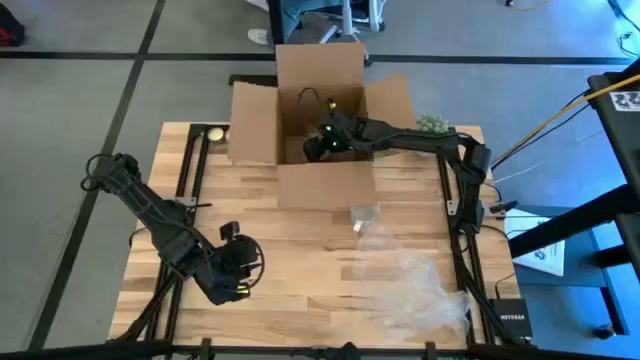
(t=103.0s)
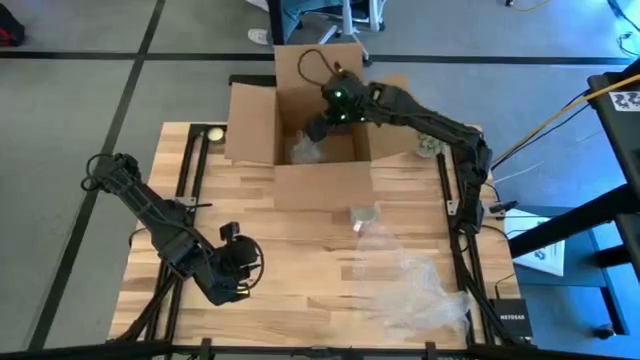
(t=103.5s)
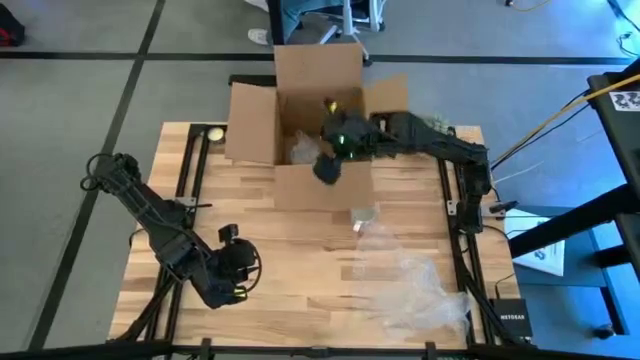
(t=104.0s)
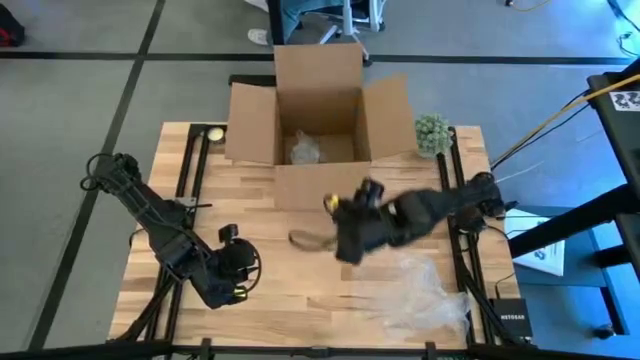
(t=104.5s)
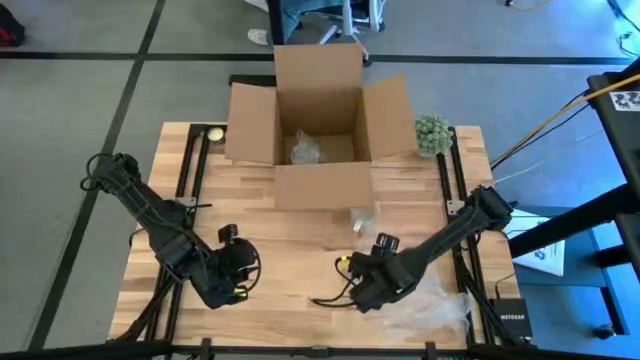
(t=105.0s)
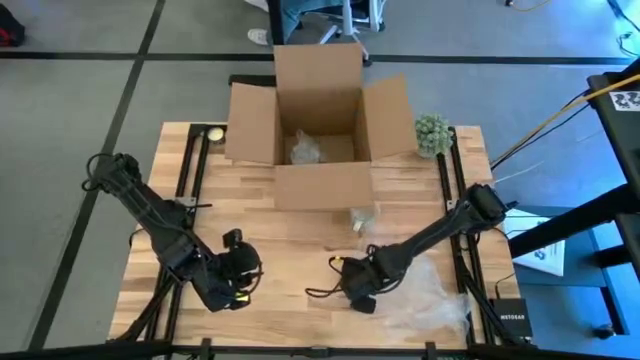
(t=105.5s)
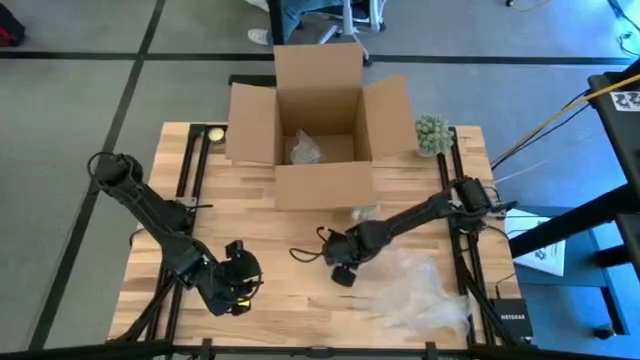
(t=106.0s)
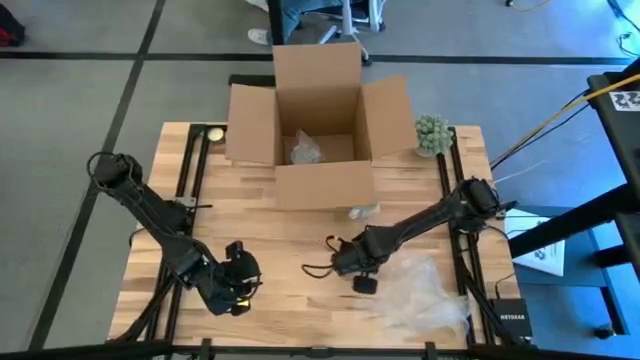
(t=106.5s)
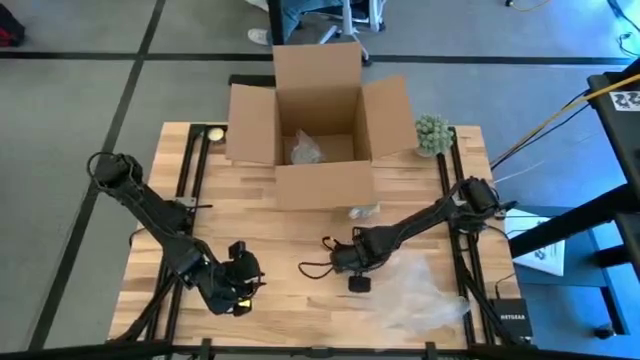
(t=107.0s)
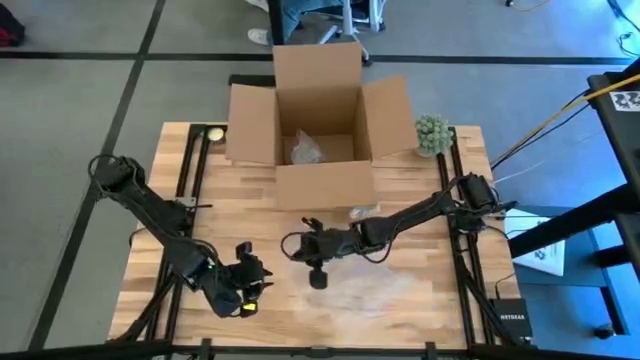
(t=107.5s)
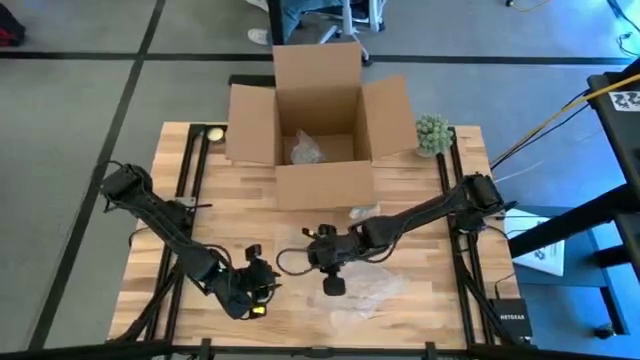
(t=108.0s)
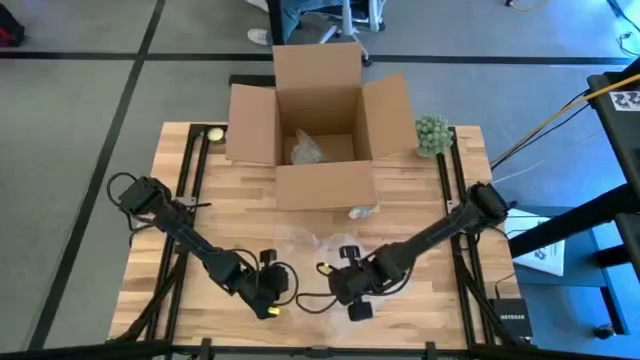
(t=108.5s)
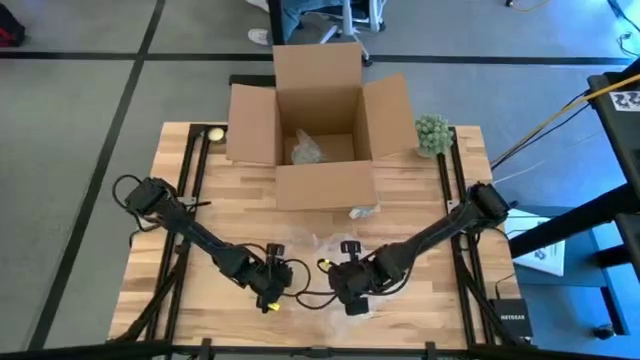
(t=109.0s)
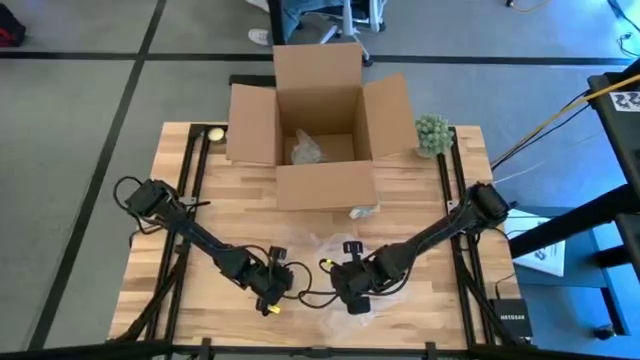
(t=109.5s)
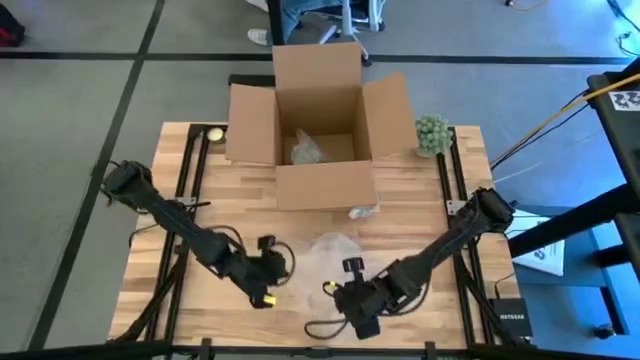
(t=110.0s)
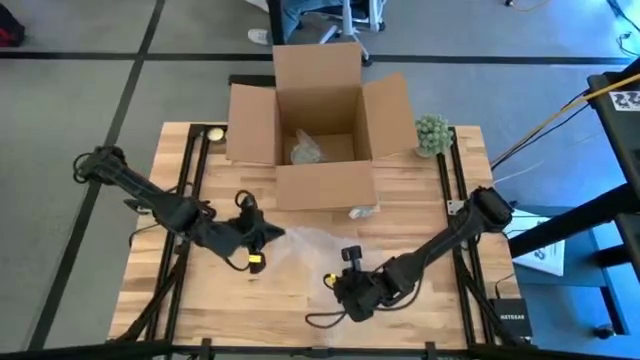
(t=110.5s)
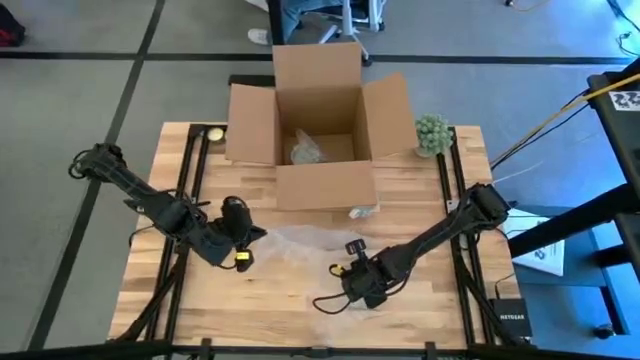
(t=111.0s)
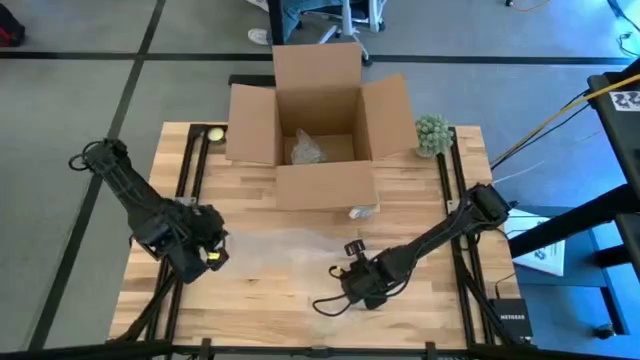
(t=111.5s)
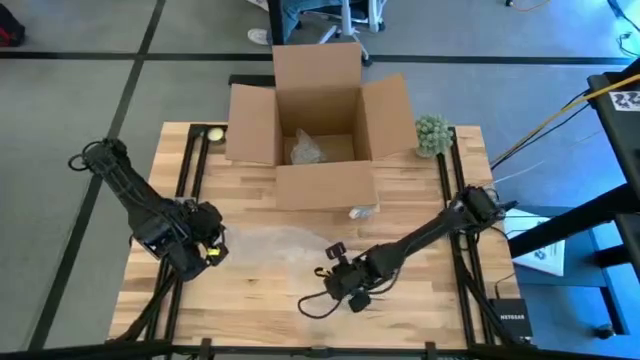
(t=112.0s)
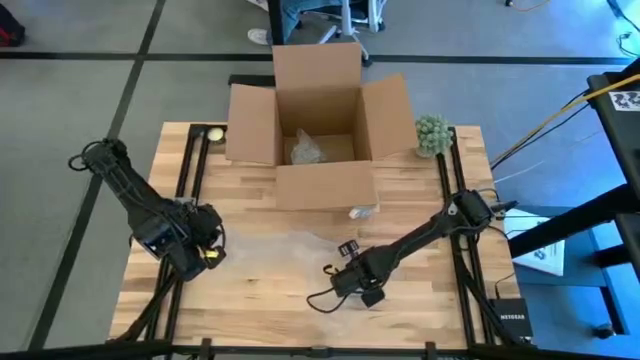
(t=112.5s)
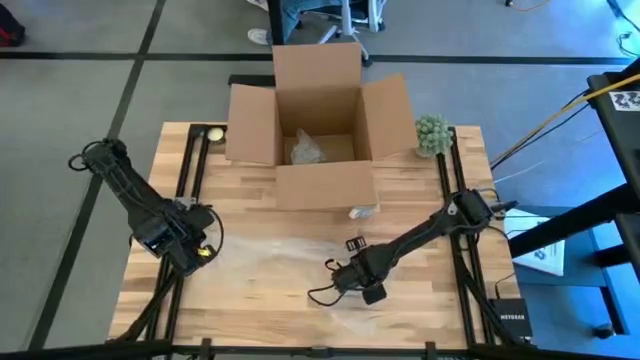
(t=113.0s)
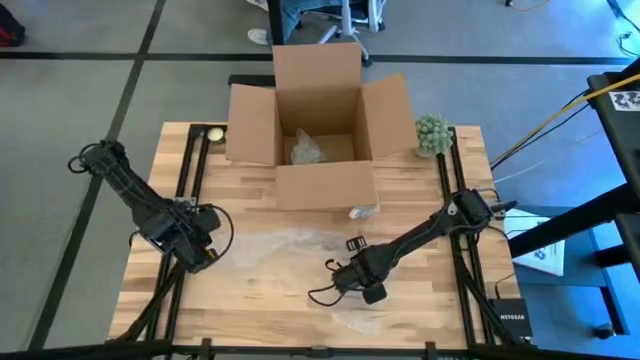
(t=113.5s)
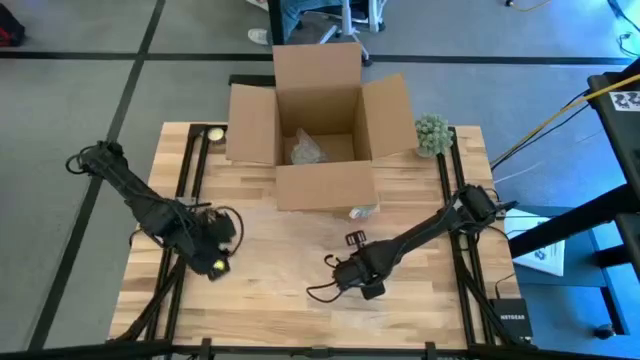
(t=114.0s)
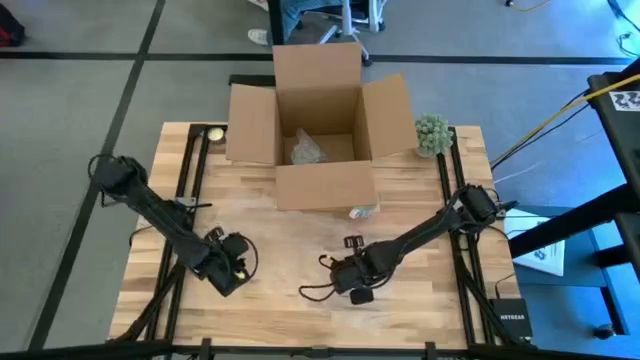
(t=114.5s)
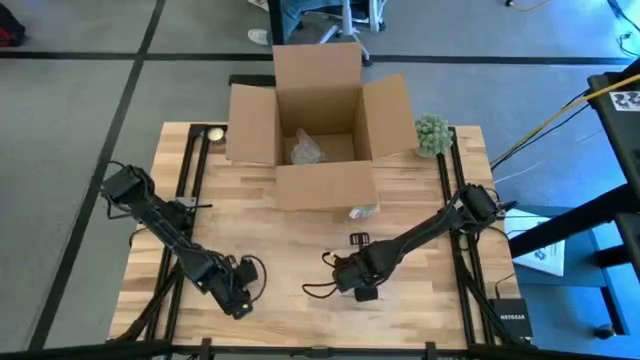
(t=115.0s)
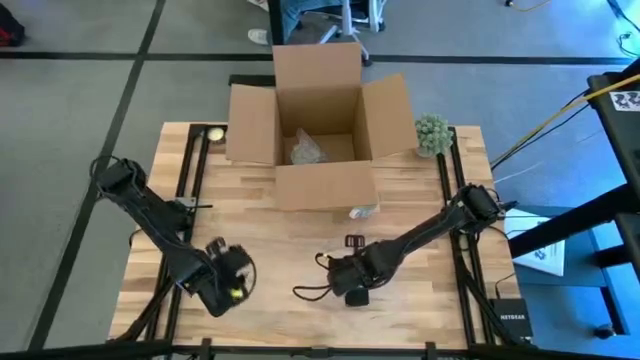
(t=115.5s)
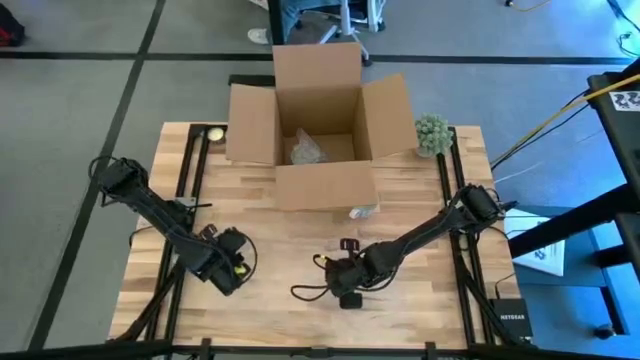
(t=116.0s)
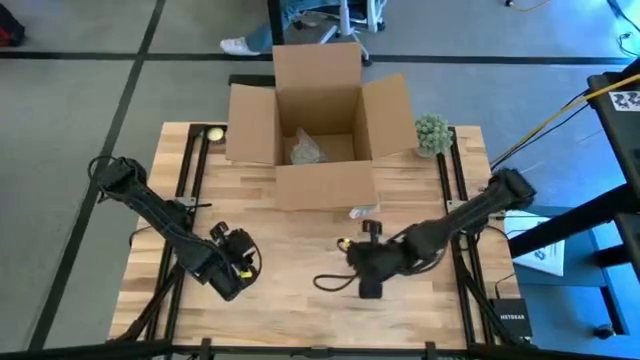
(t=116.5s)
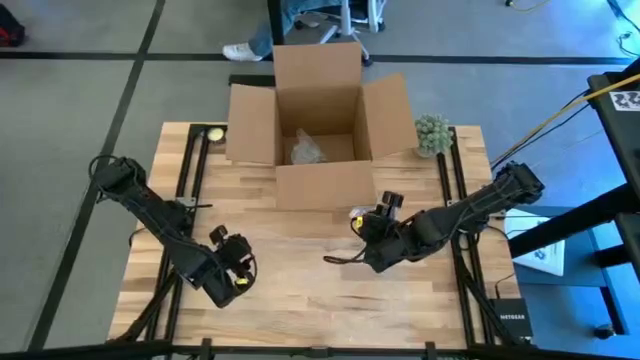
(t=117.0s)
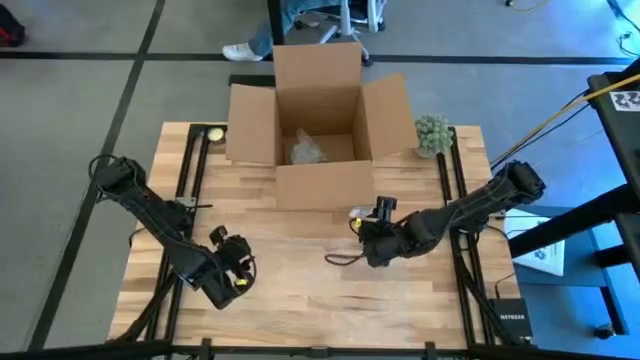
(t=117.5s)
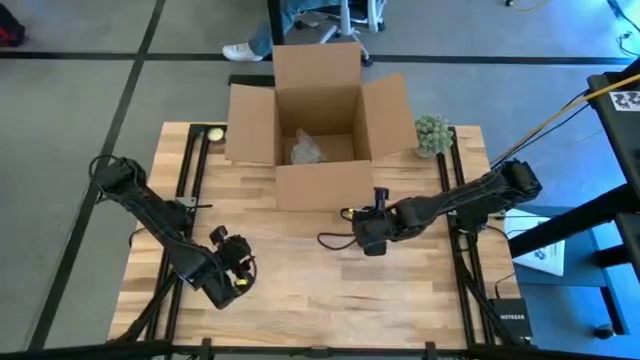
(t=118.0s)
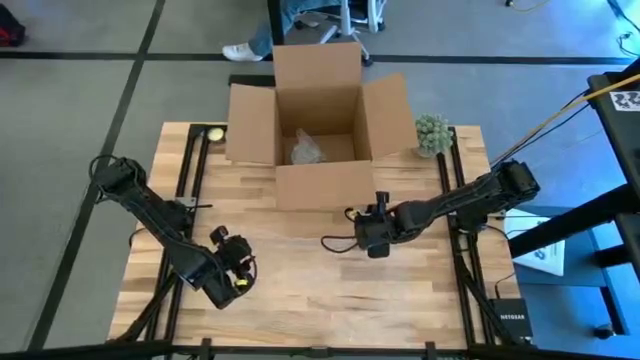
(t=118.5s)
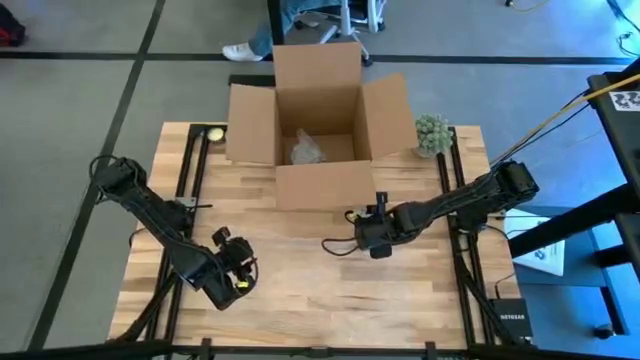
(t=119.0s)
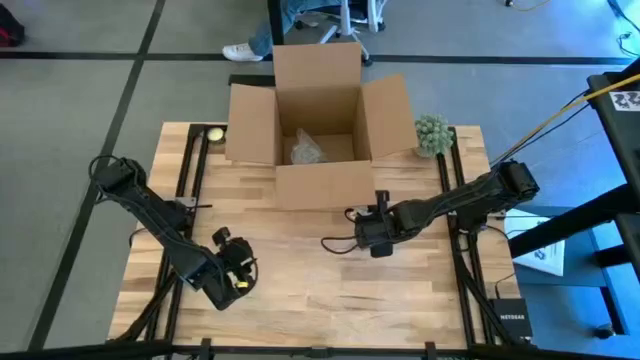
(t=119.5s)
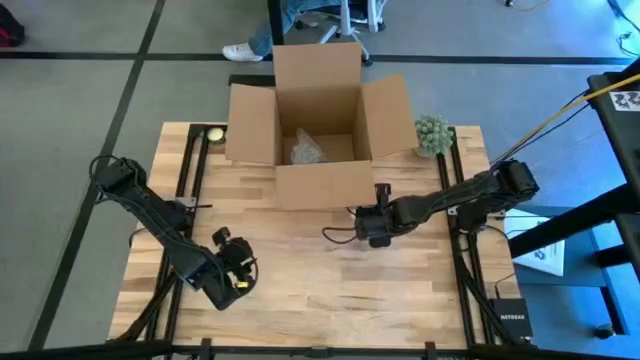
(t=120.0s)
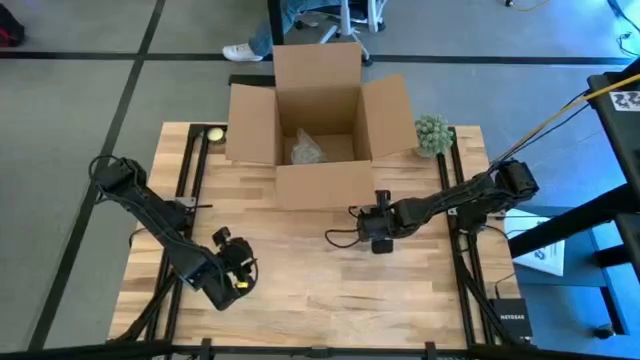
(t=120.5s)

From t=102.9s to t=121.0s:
Task: wrap mug
Wrap the white mug with bubble wrap

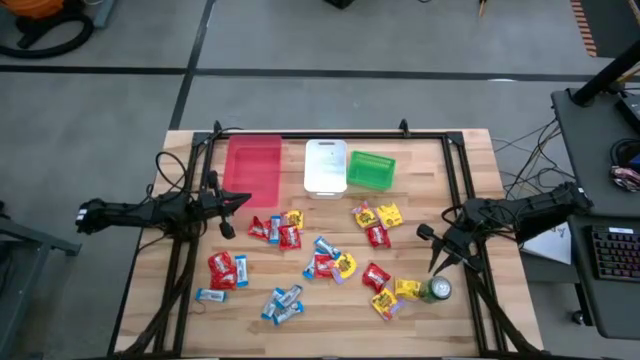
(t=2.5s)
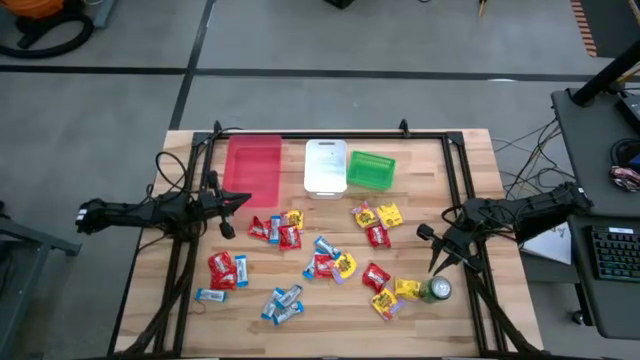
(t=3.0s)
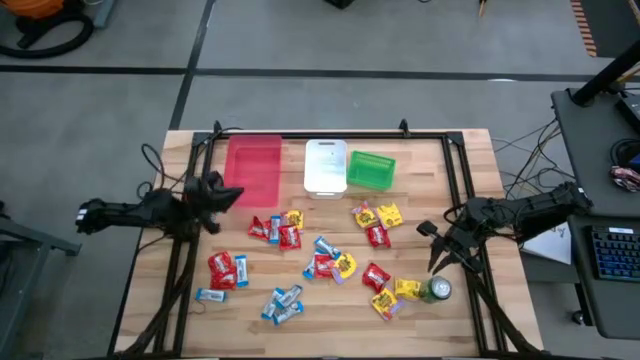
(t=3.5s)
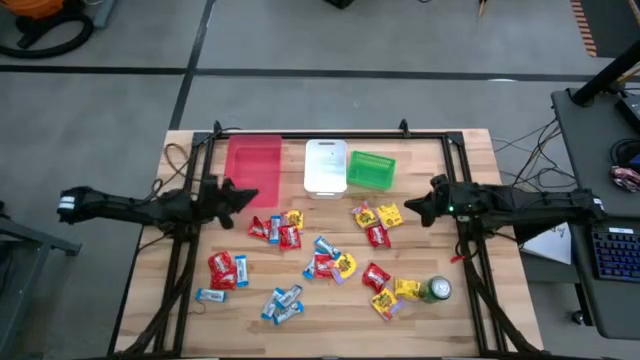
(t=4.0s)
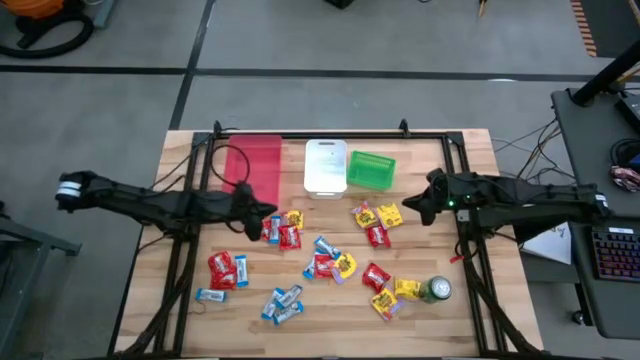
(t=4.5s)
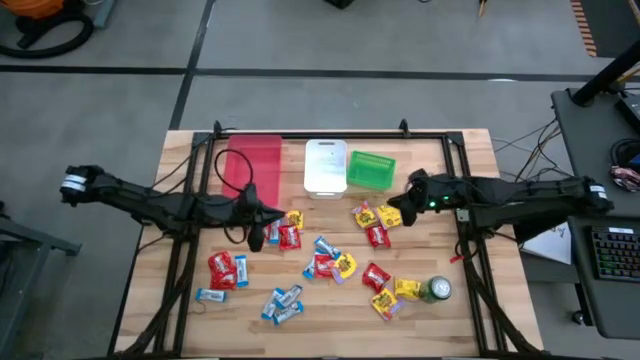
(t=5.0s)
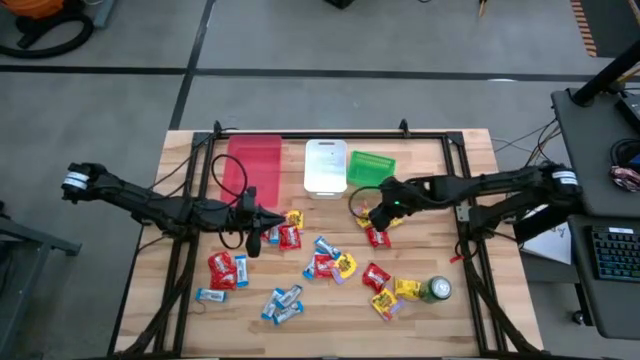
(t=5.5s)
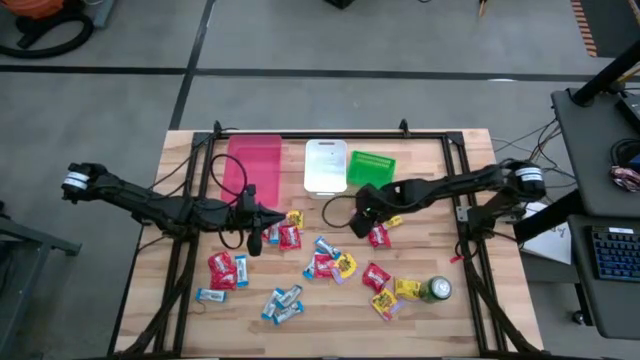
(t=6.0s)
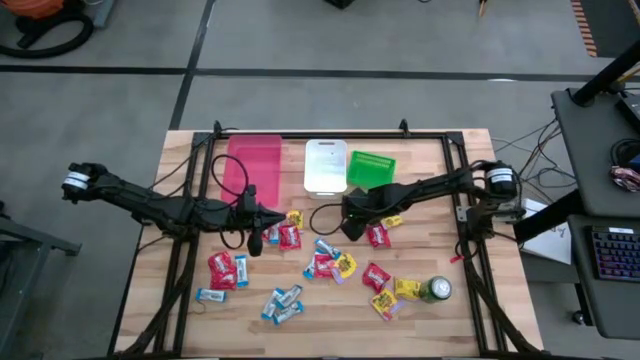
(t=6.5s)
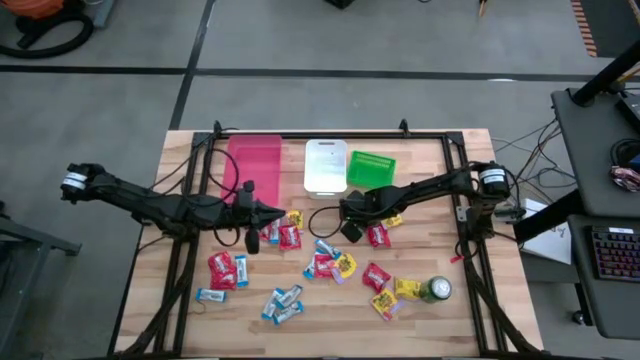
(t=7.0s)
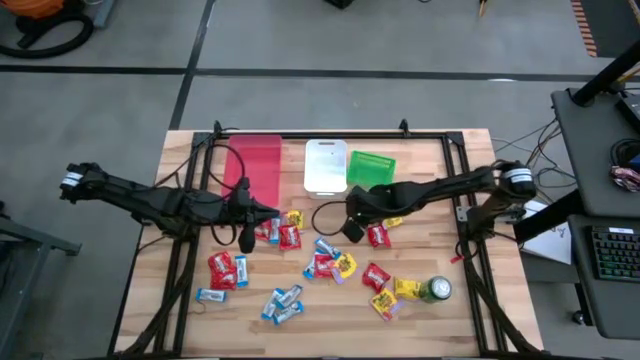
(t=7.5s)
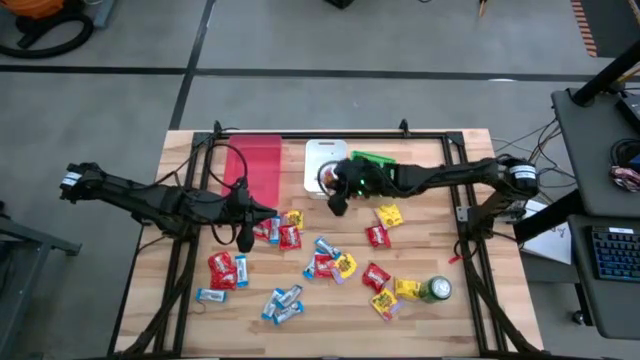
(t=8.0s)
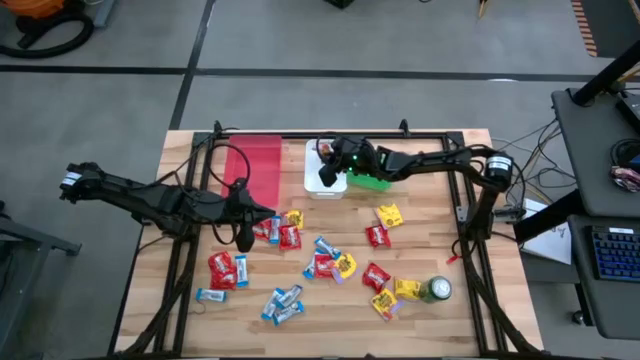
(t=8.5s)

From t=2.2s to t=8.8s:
Task: Sort candy
Put the yellow candy into the white bin
